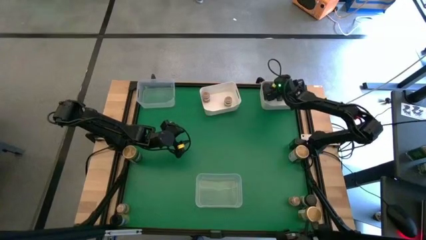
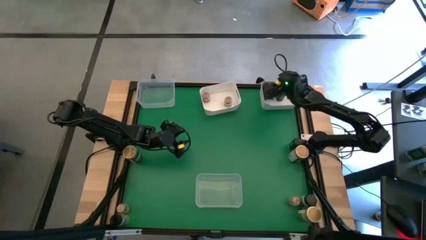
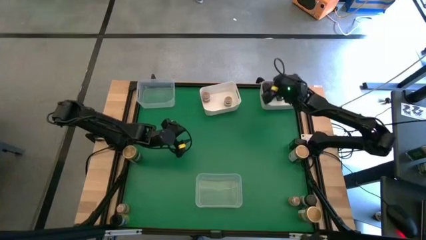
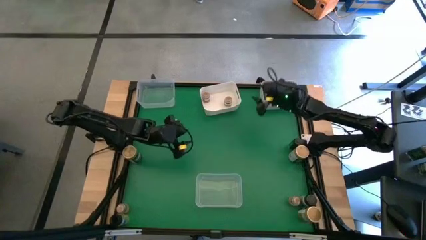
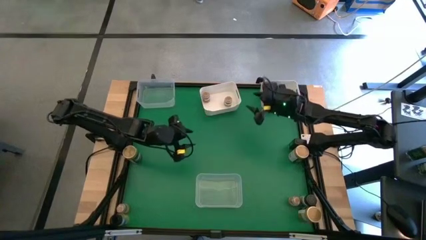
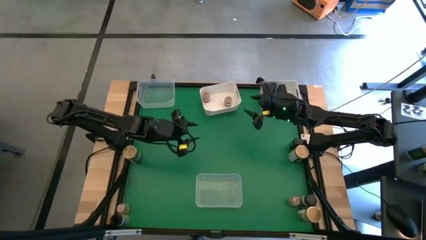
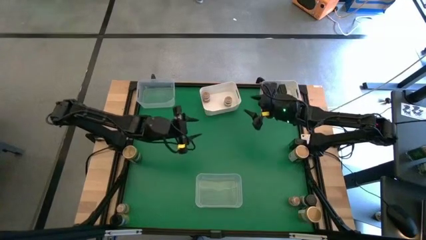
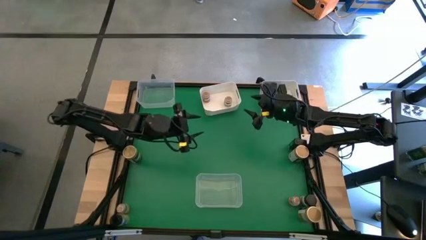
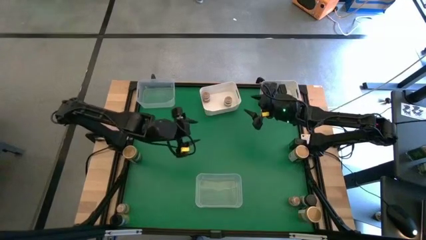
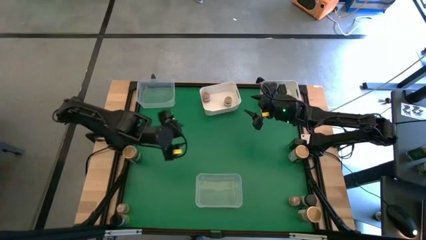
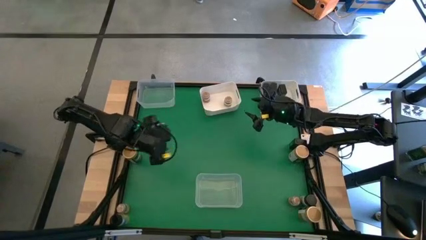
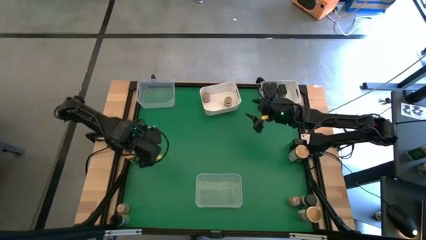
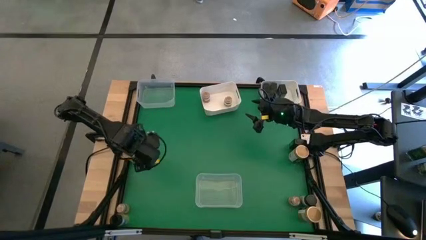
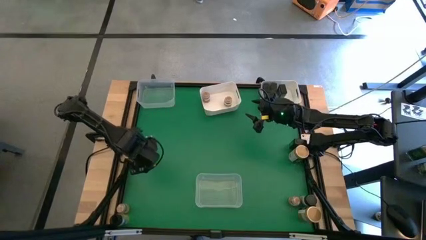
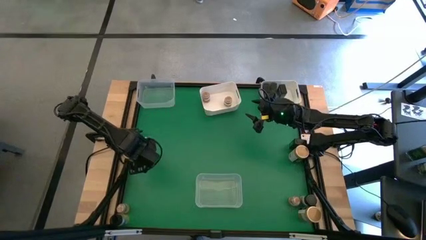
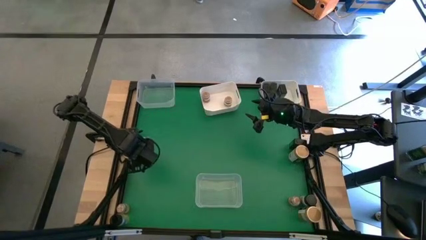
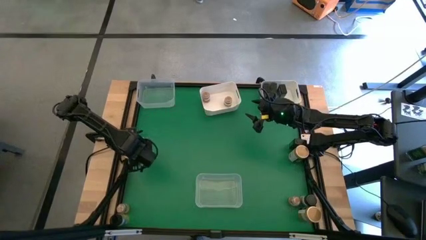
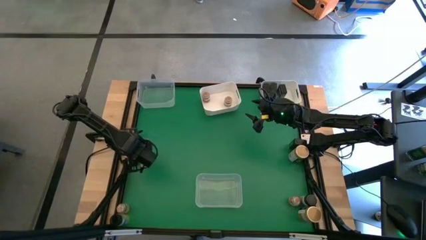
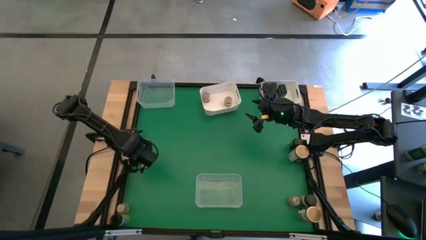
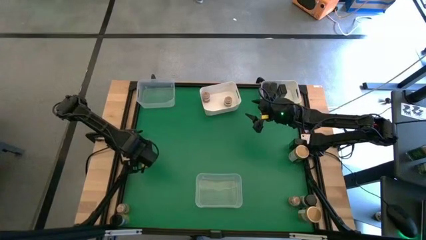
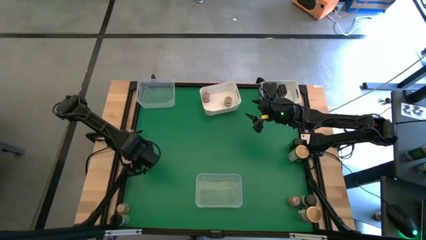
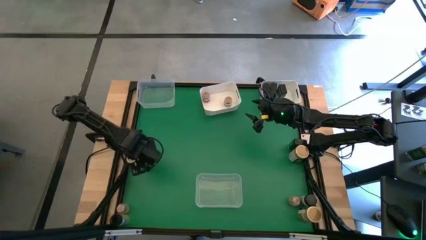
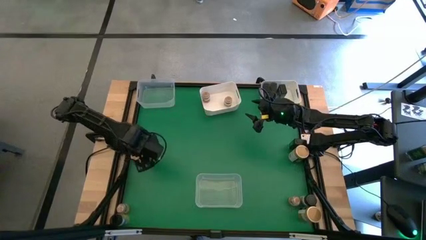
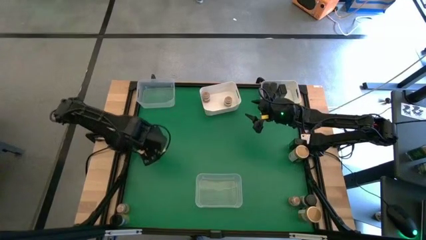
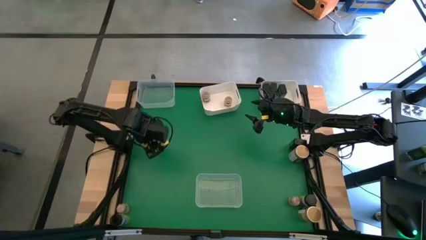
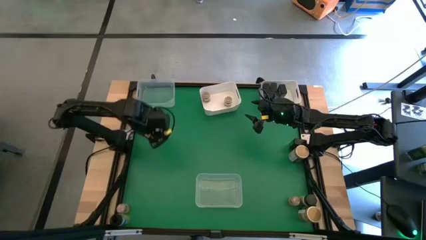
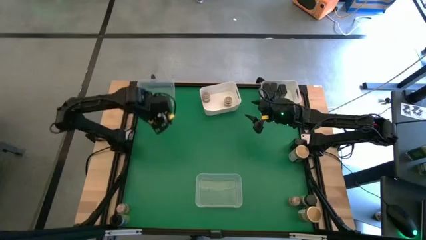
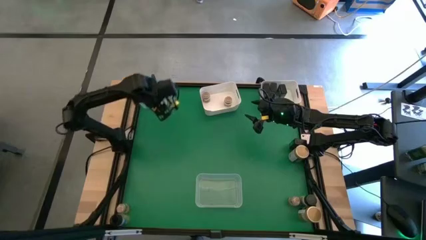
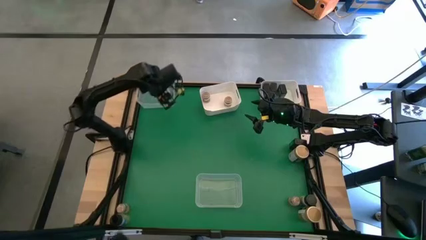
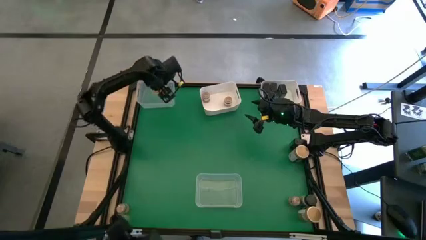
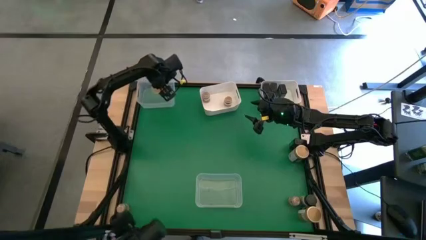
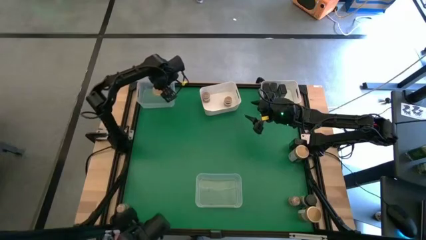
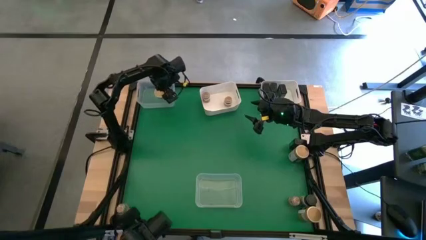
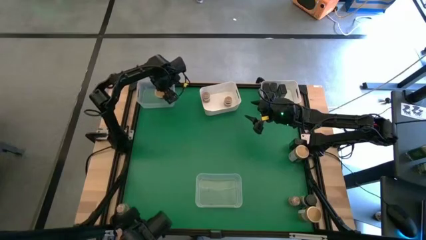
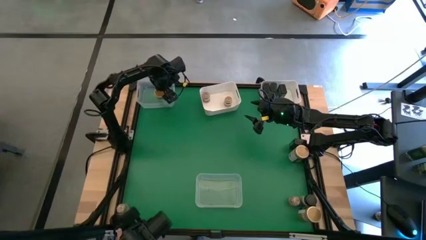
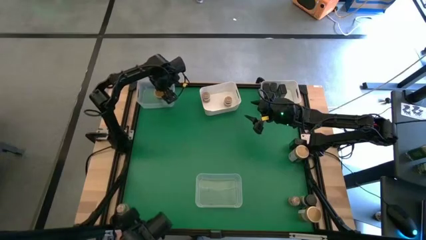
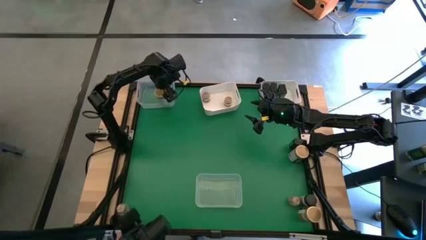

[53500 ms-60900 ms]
Task: Sort spices by type
Put the gold seasoning bottle into the top transparent bin

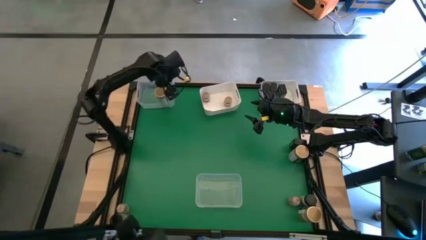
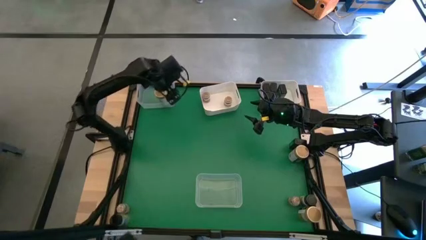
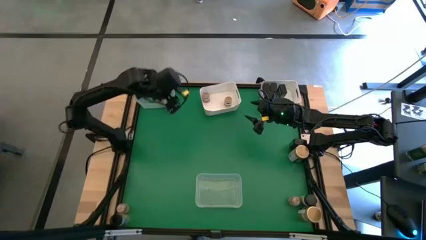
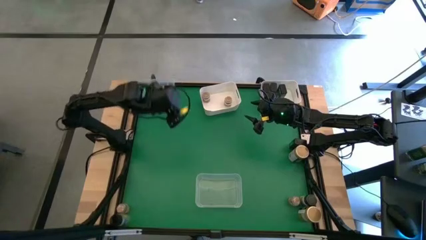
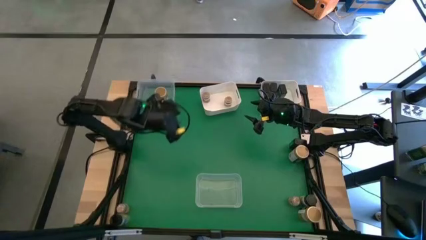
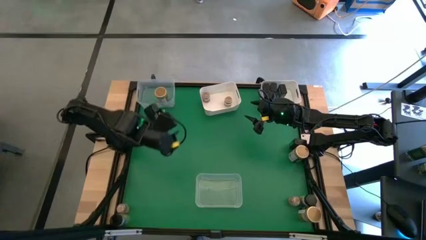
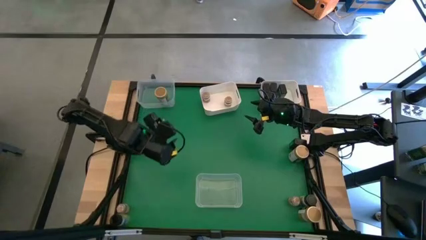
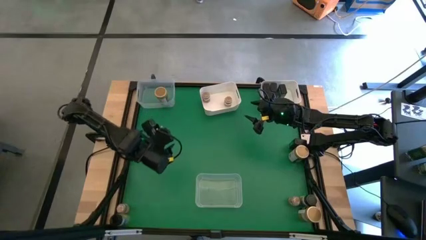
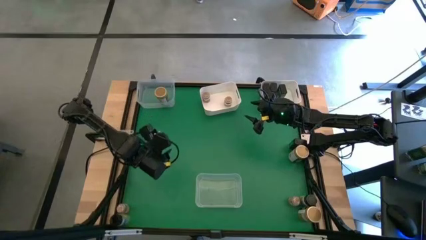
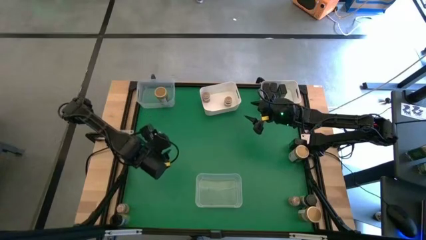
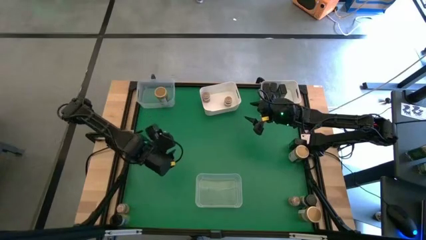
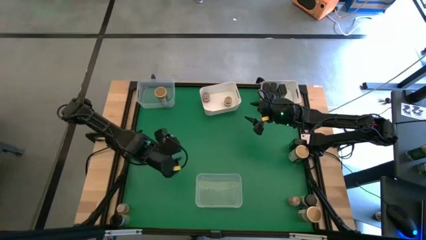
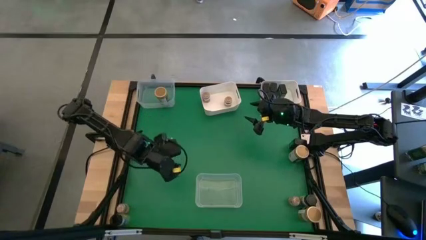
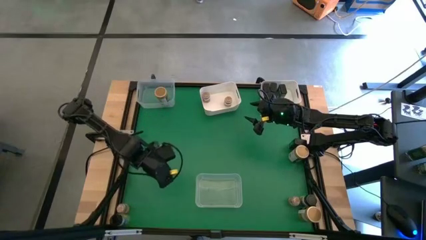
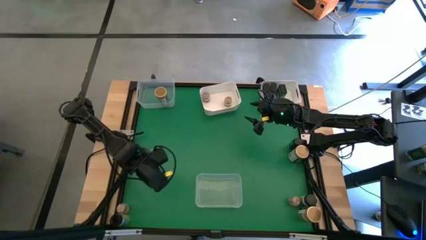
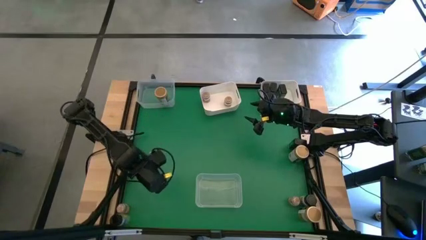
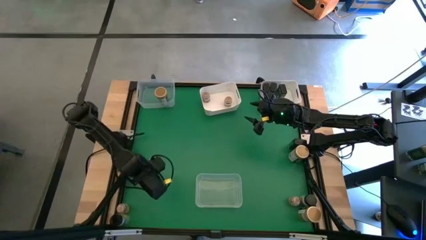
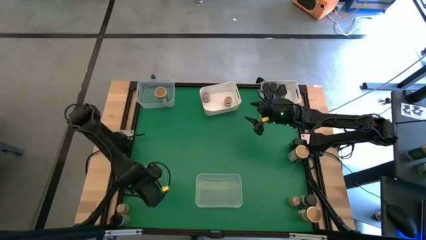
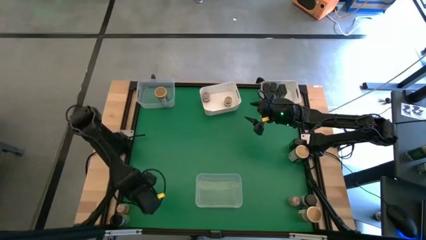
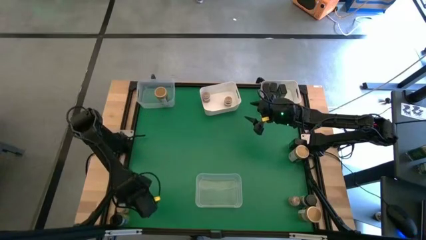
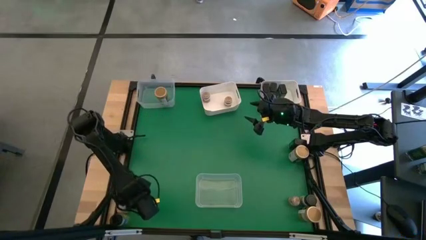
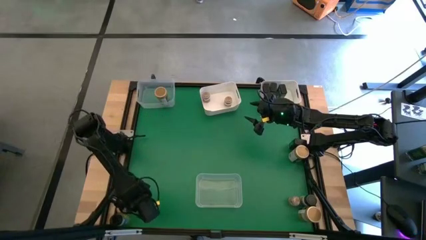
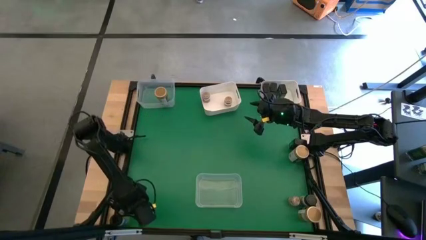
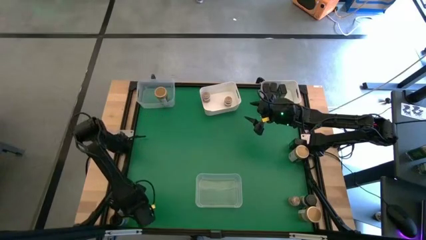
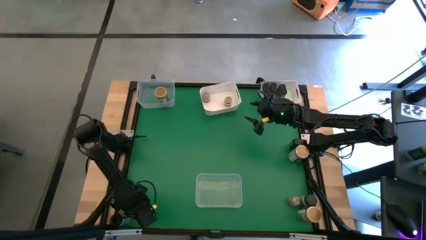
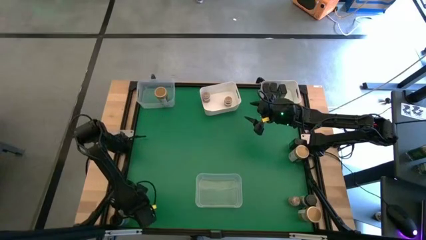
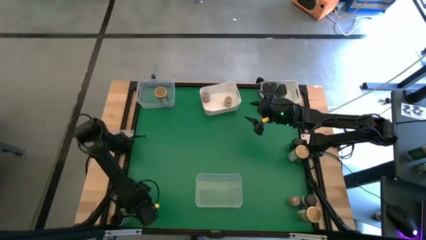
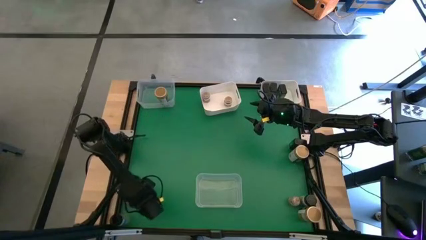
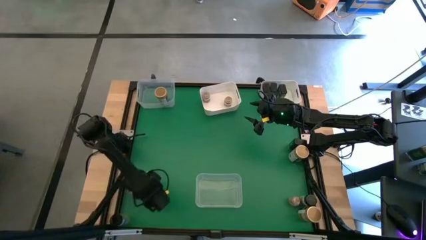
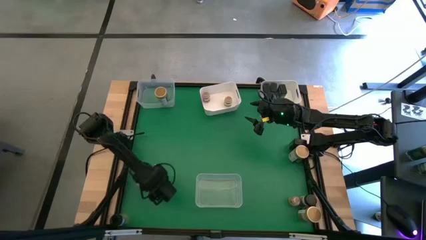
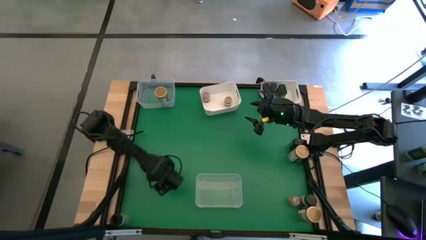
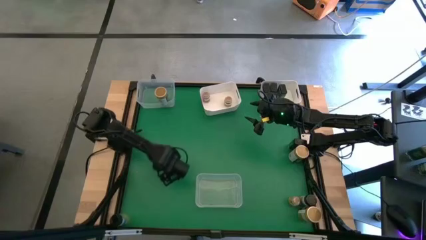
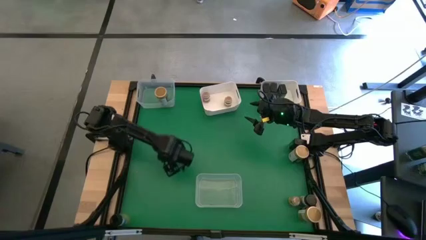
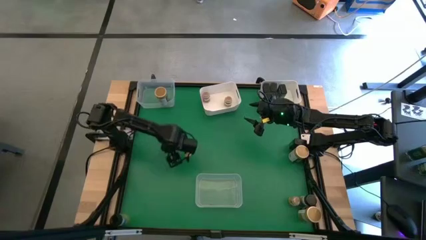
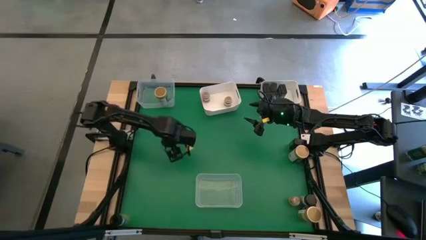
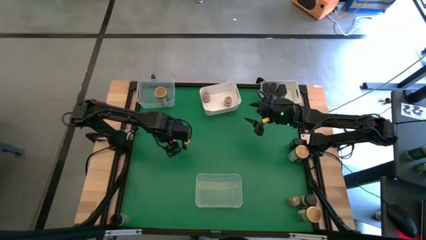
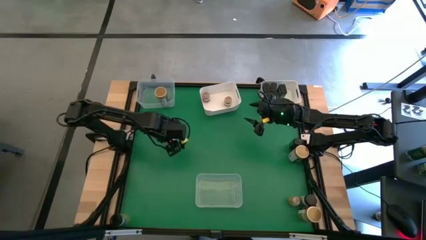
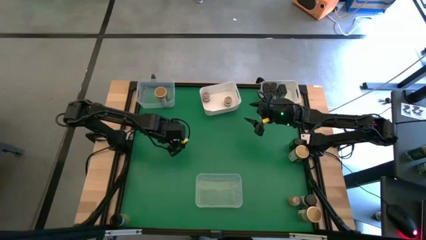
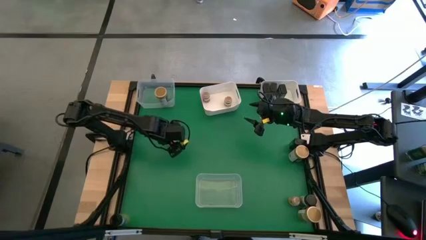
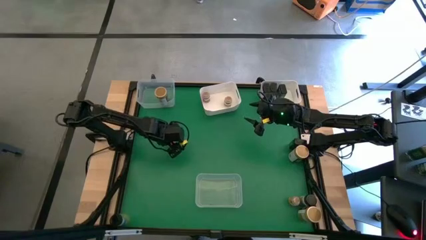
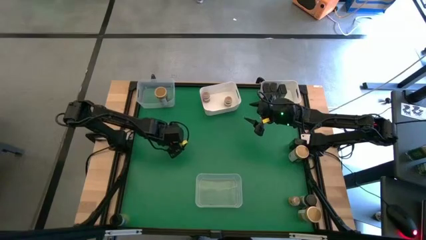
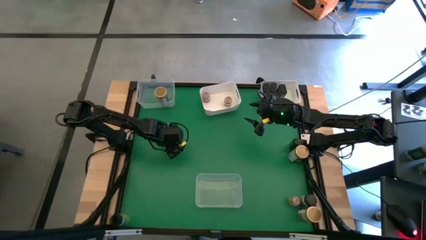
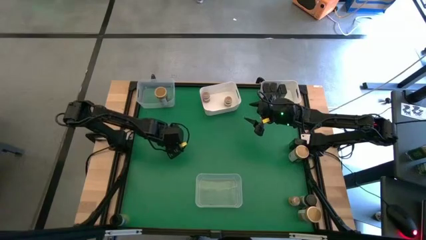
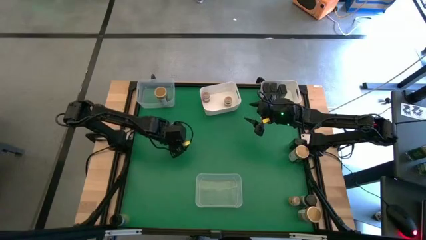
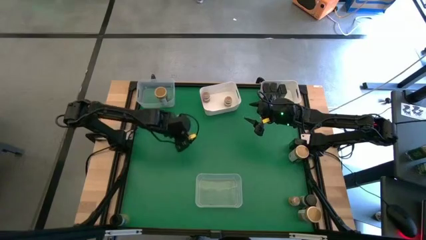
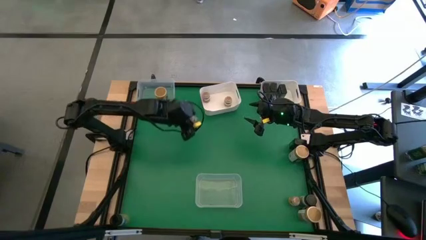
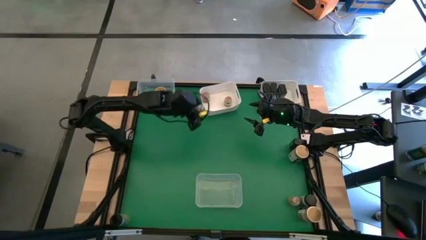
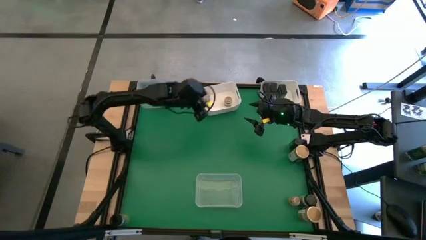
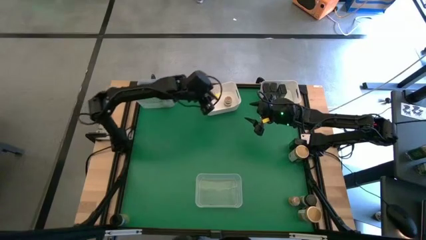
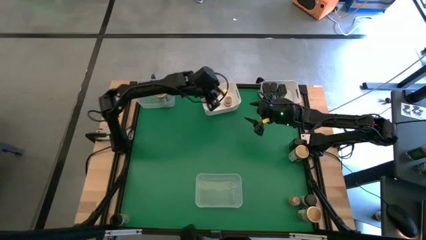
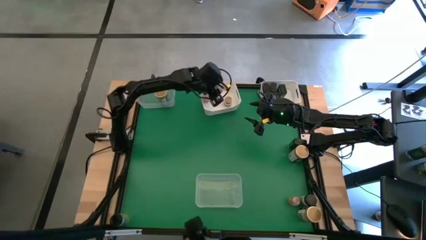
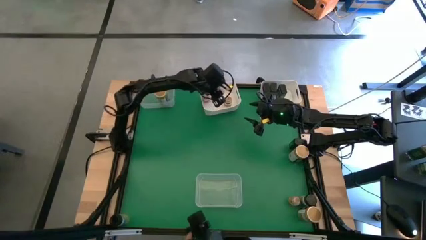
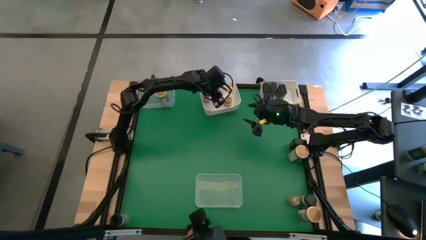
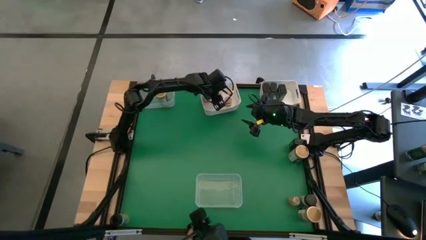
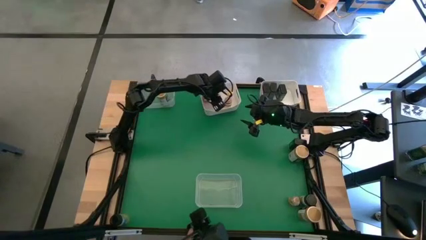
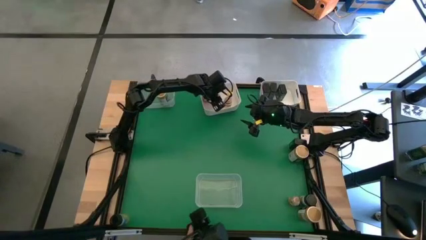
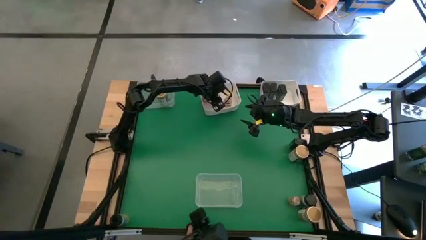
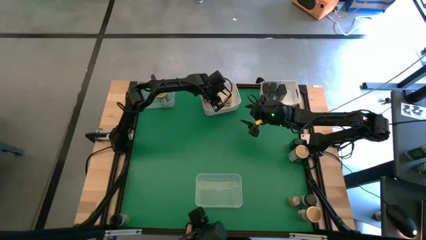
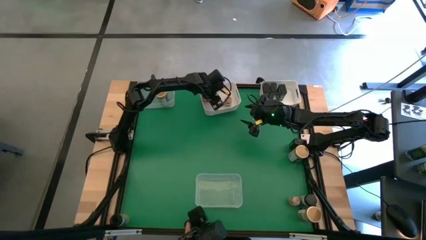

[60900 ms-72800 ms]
Put the brown seasoning bottle into the left white bin
